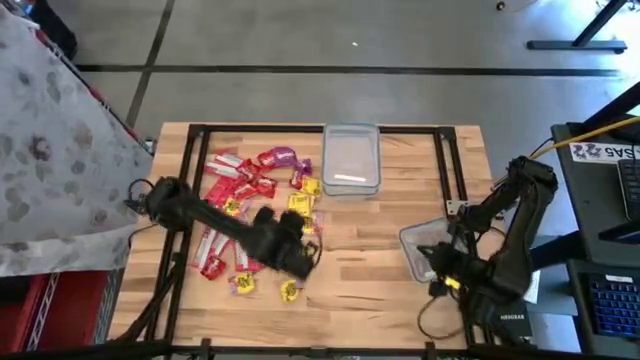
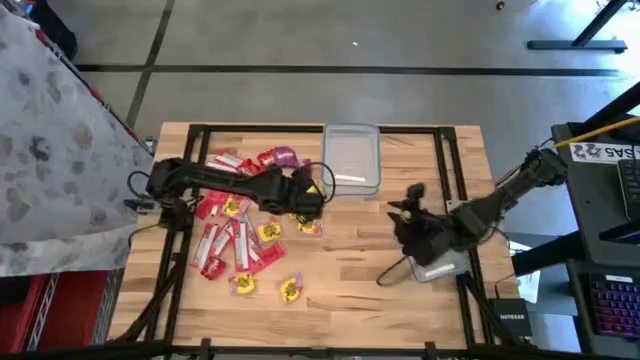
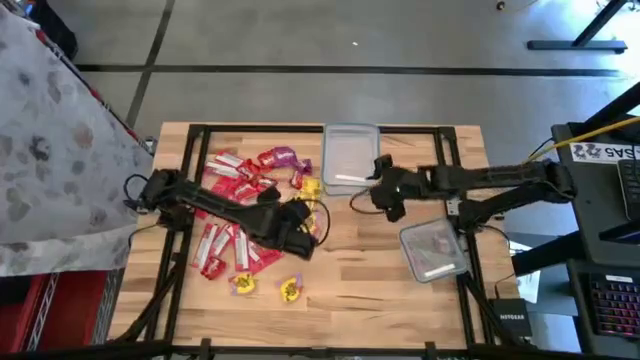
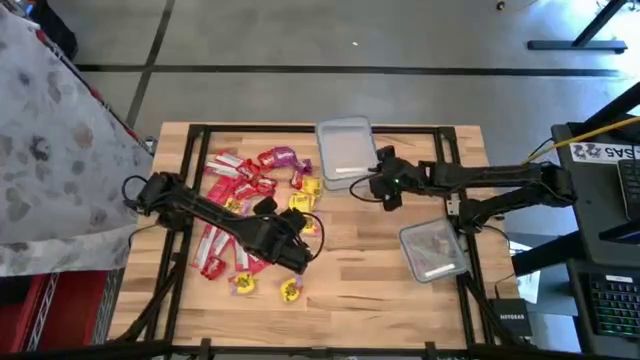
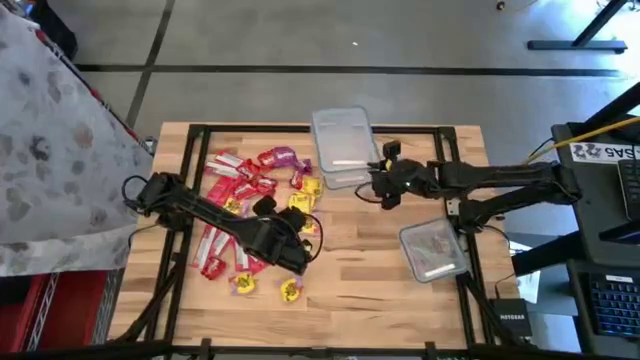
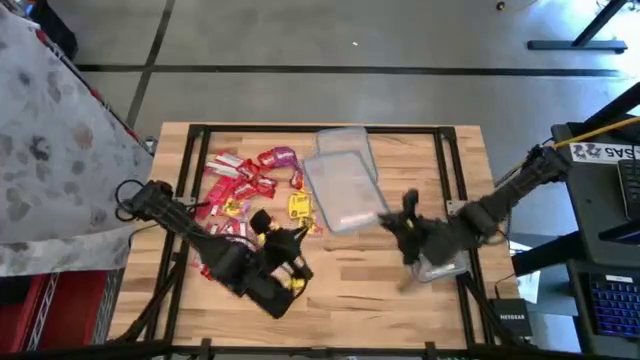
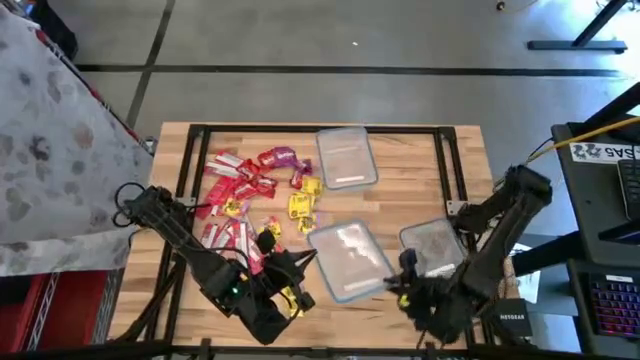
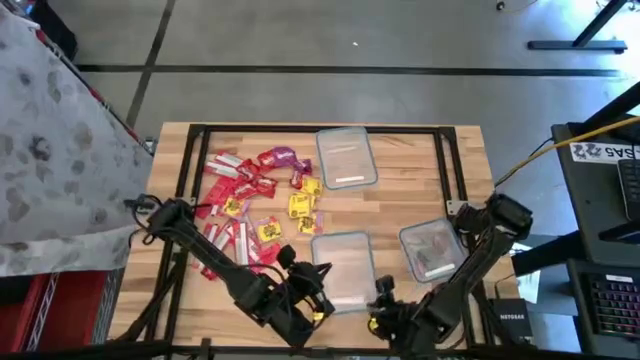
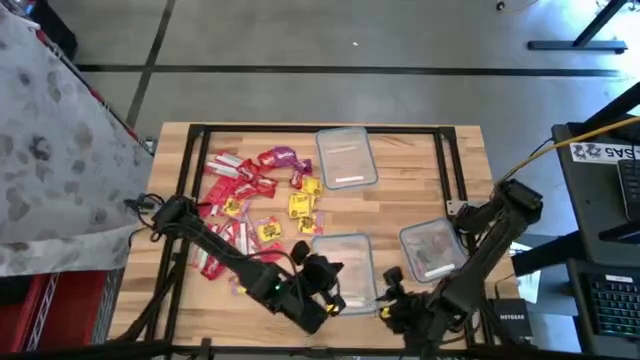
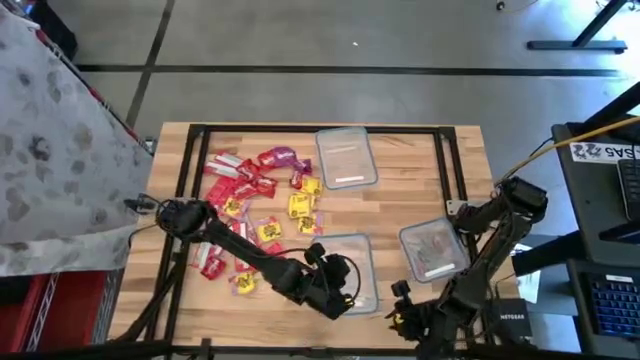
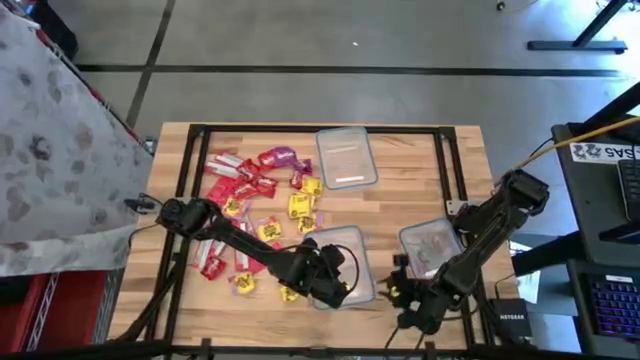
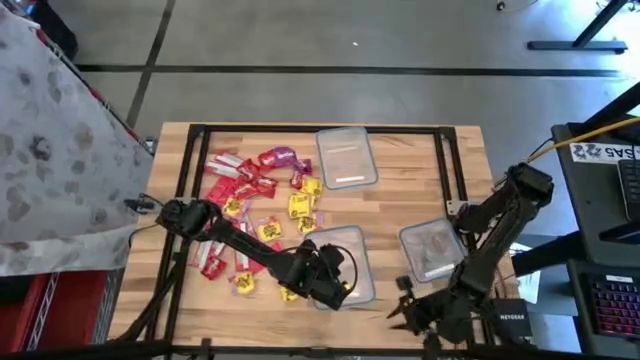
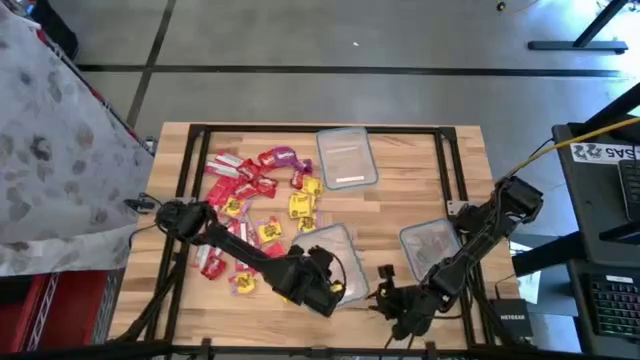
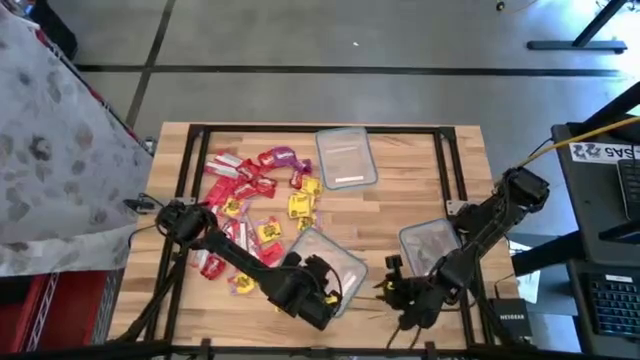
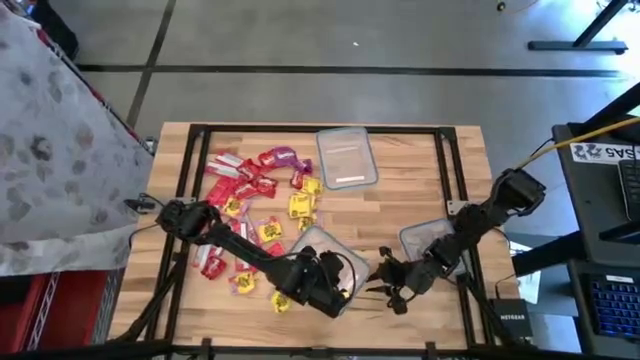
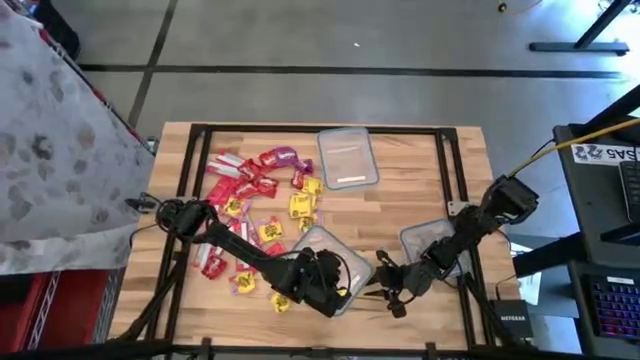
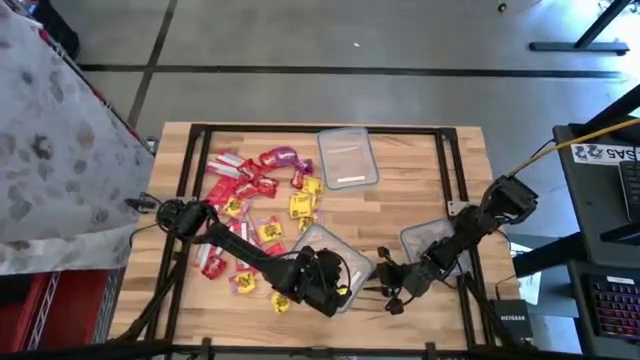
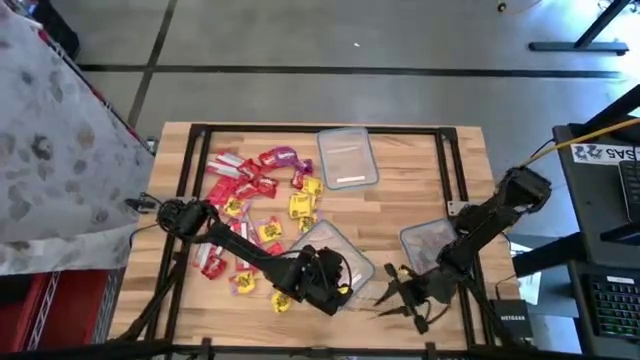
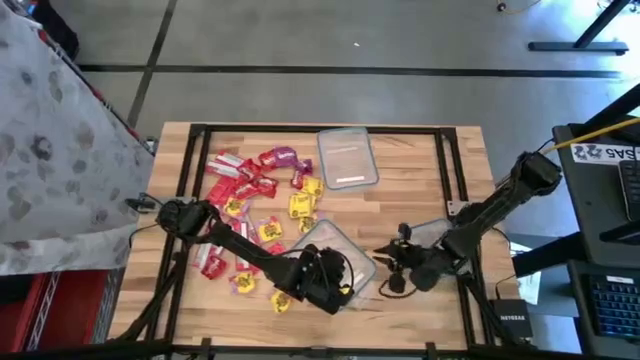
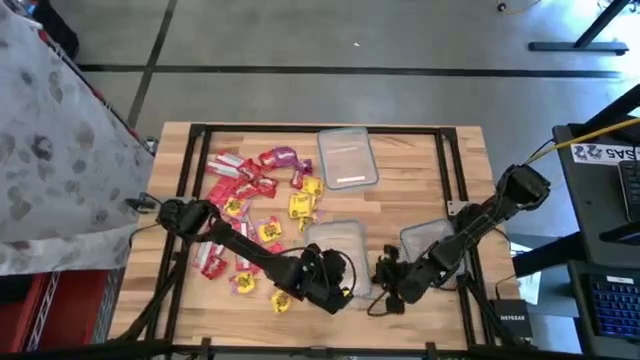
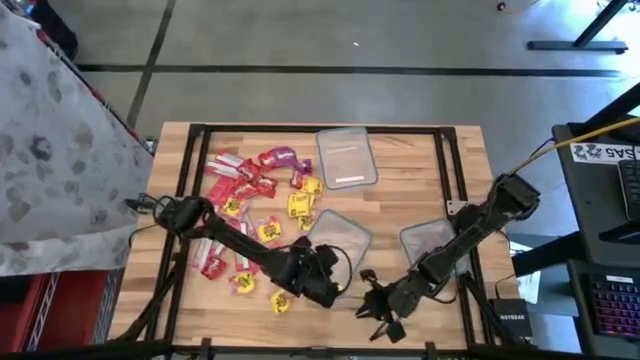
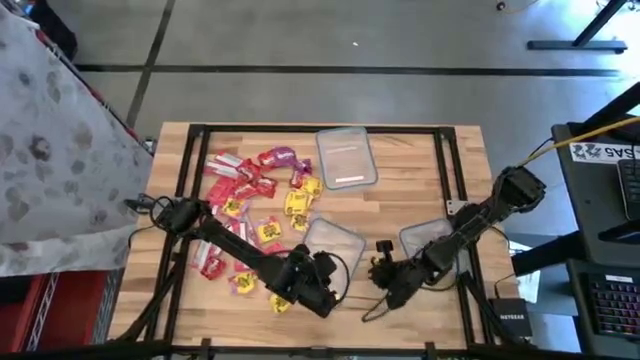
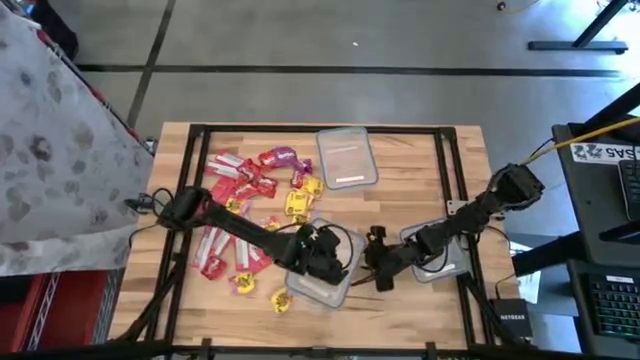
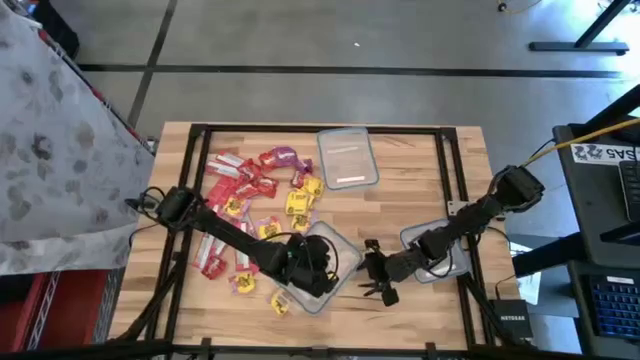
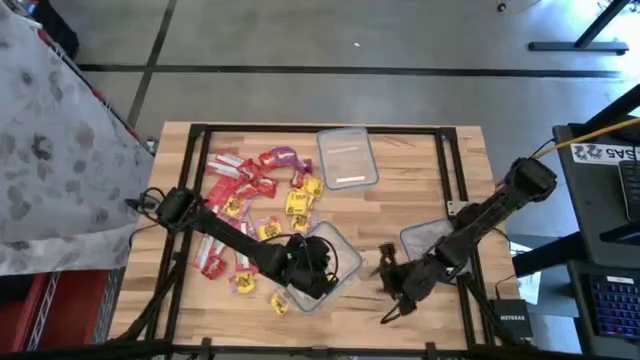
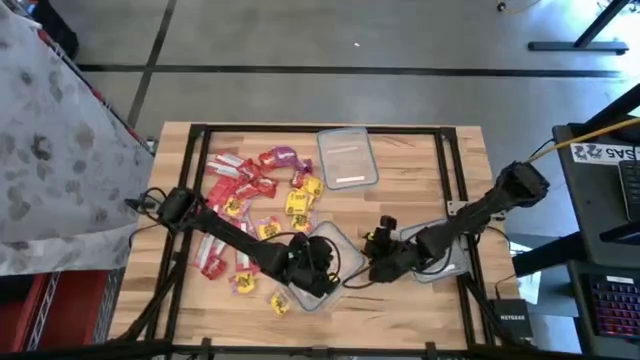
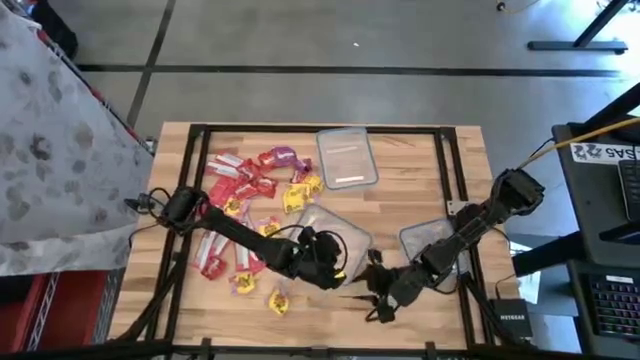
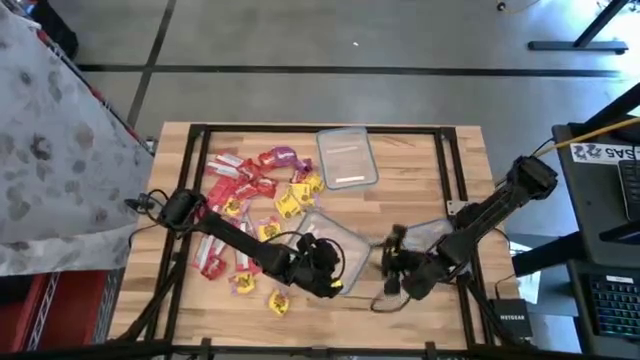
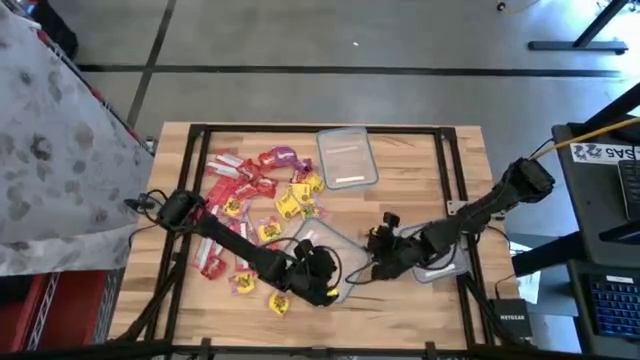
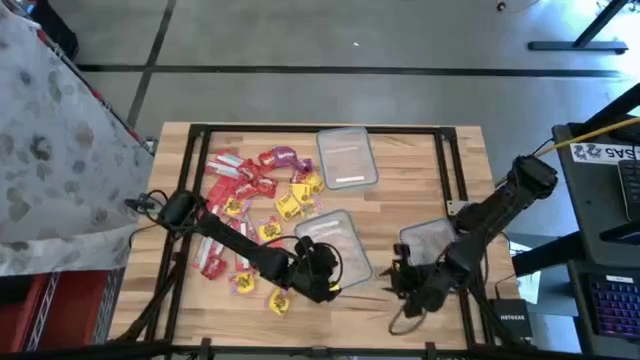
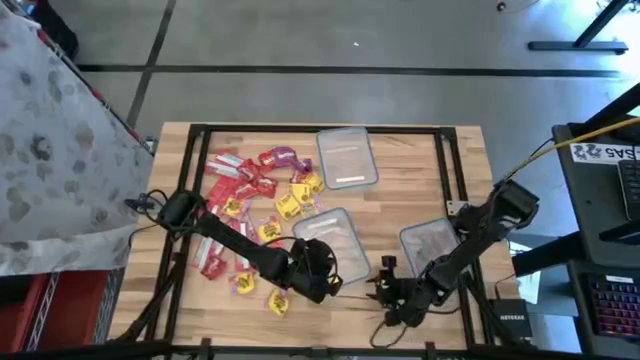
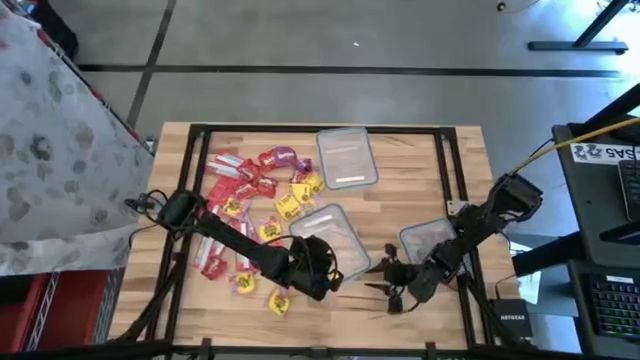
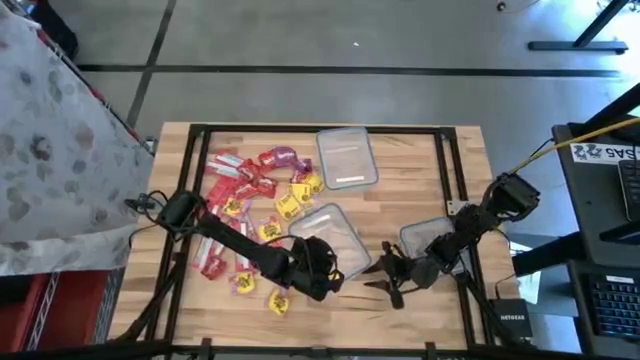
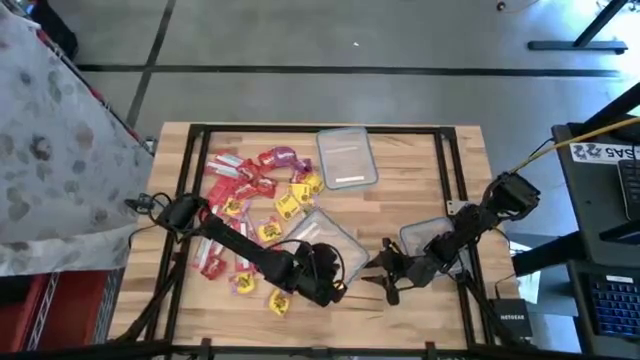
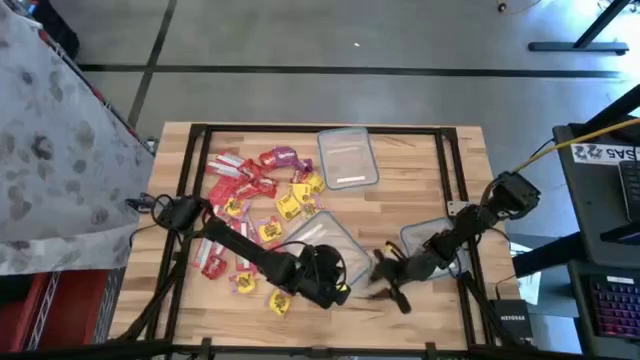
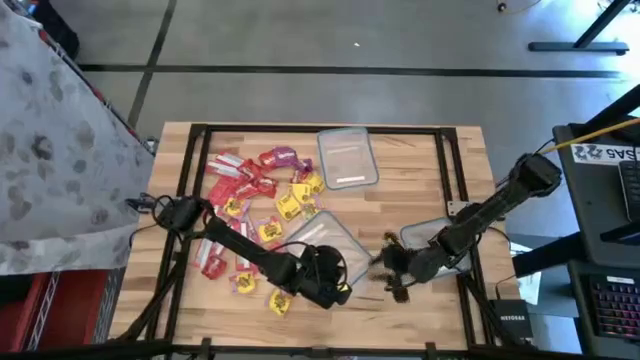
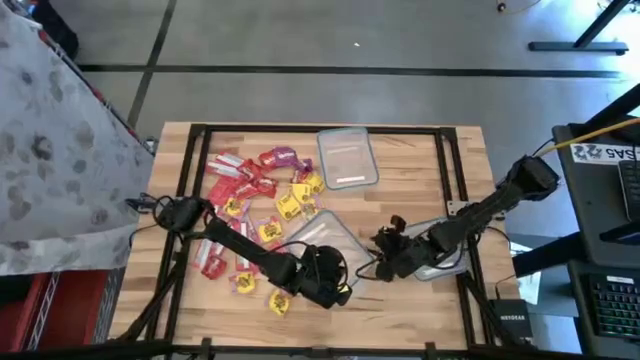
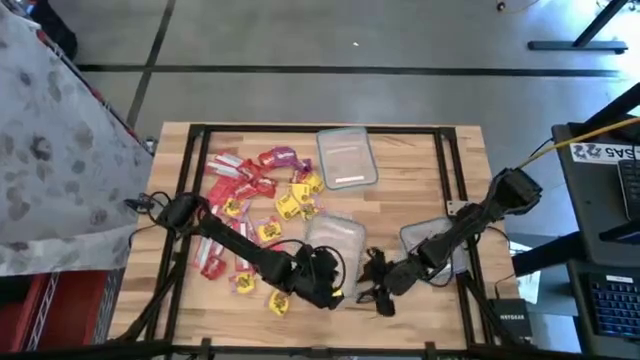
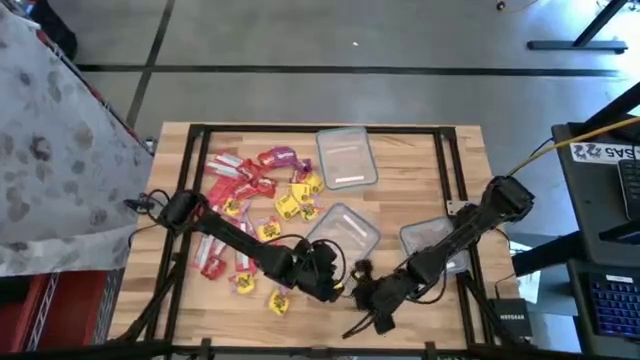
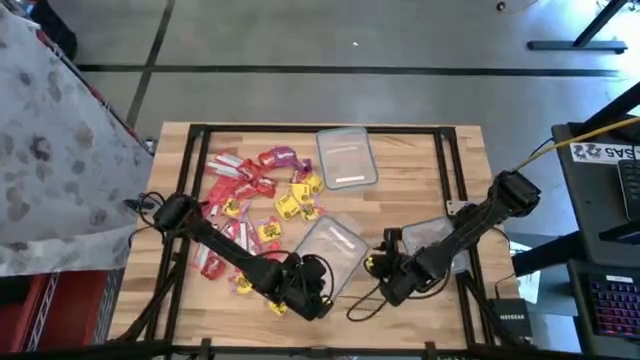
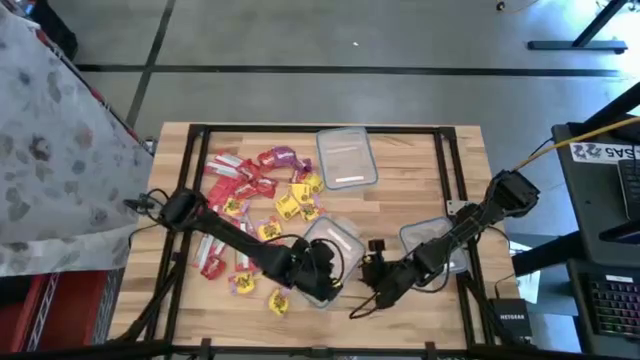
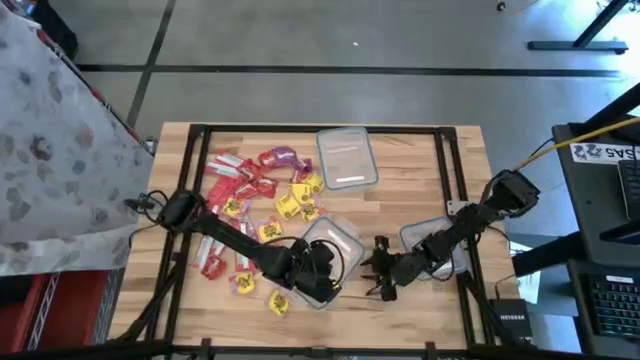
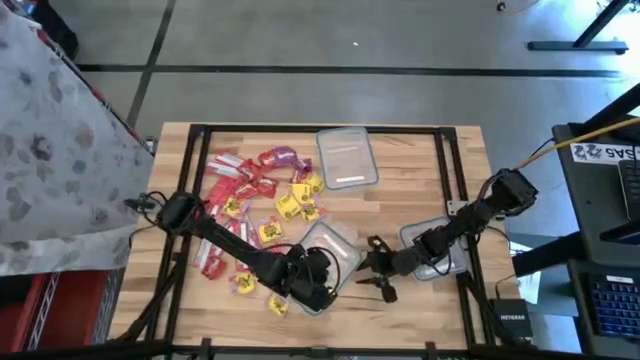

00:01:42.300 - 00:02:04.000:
Task: Sort candy
Open the top rectangular transparent food container

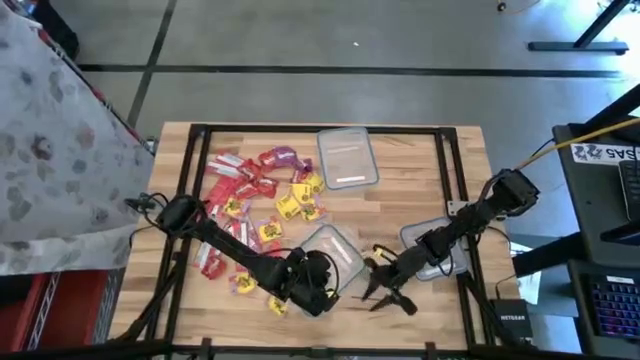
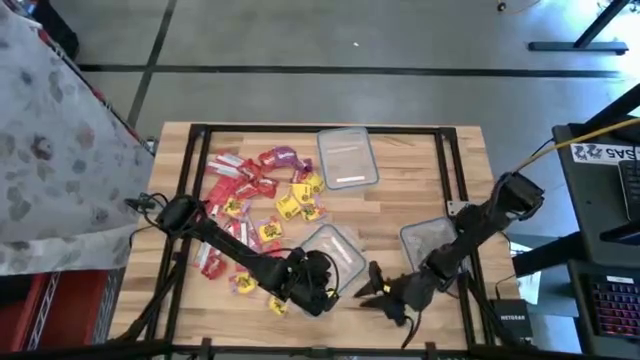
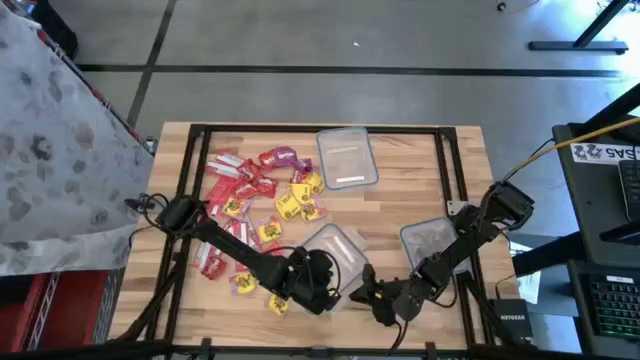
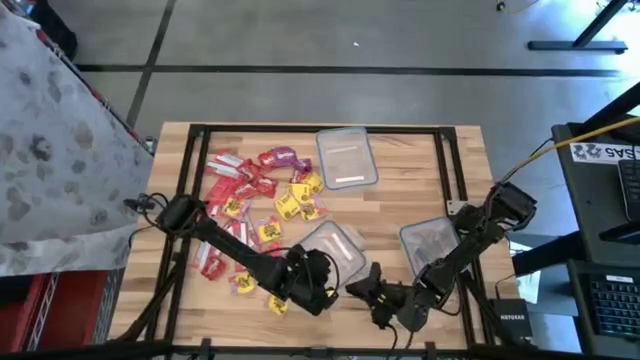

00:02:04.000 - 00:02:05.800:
Open the top rectangular transparent food container
